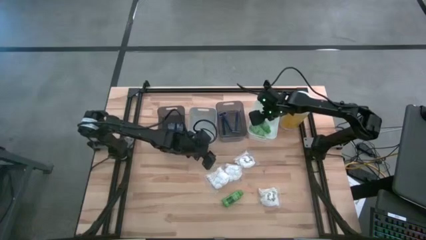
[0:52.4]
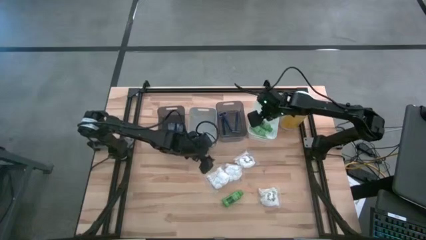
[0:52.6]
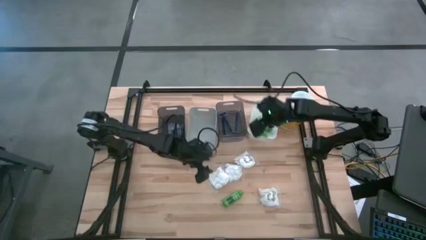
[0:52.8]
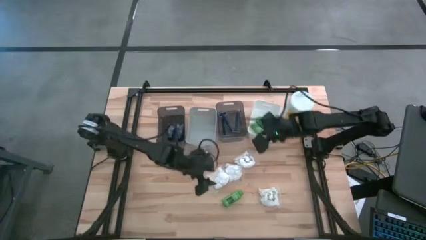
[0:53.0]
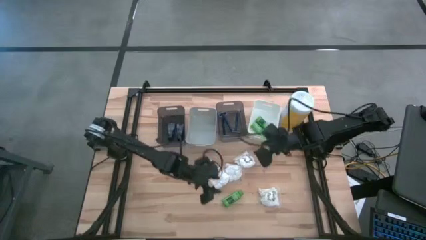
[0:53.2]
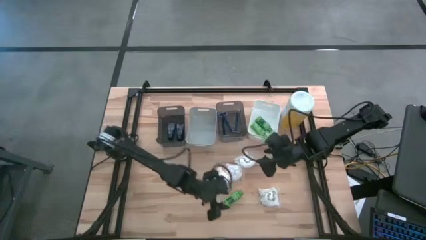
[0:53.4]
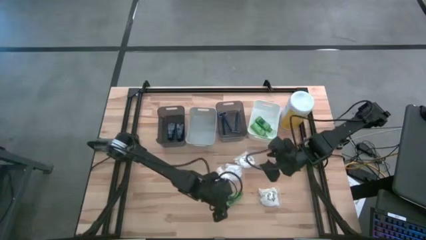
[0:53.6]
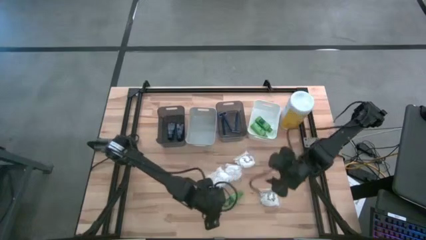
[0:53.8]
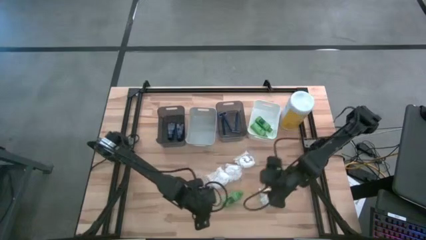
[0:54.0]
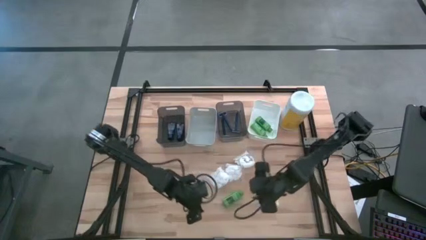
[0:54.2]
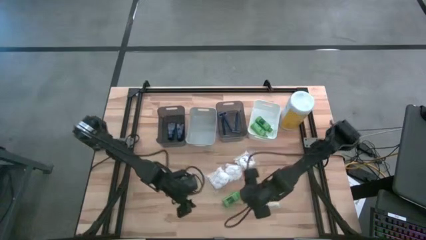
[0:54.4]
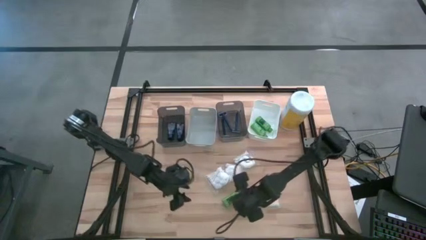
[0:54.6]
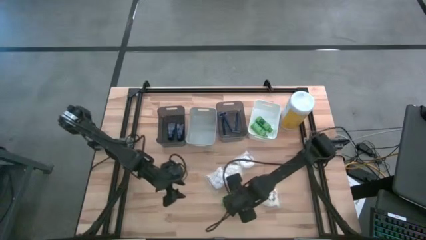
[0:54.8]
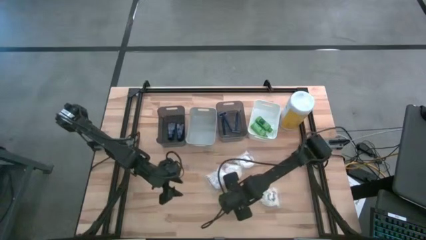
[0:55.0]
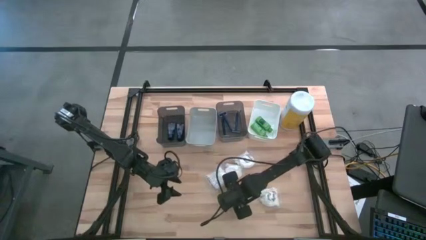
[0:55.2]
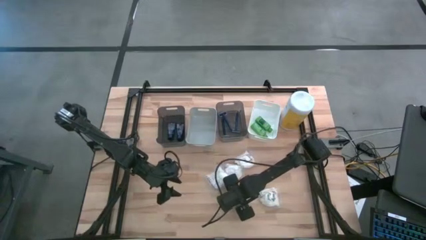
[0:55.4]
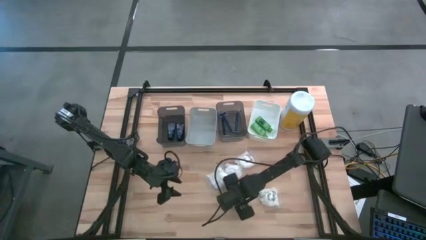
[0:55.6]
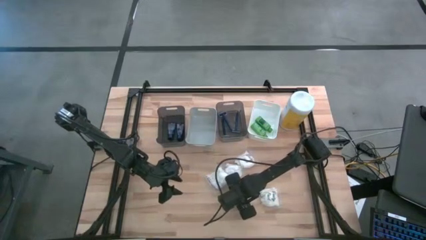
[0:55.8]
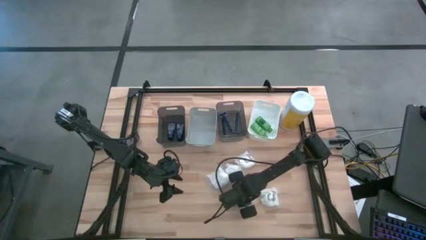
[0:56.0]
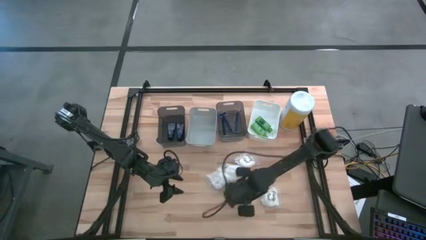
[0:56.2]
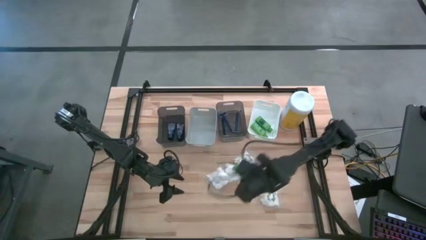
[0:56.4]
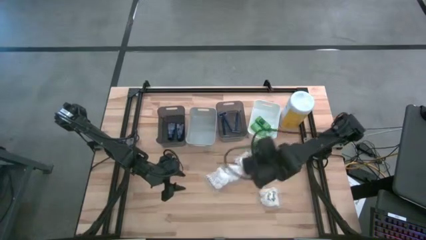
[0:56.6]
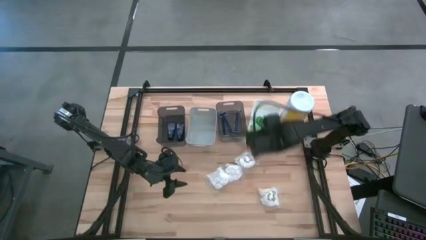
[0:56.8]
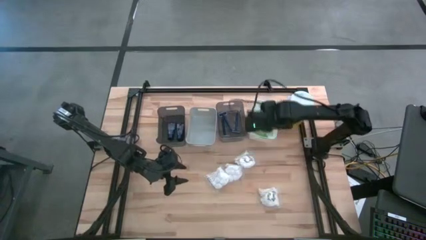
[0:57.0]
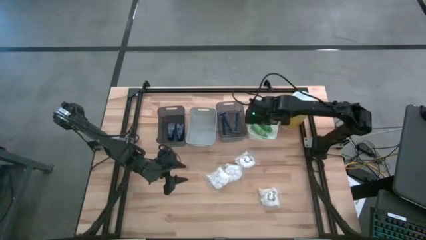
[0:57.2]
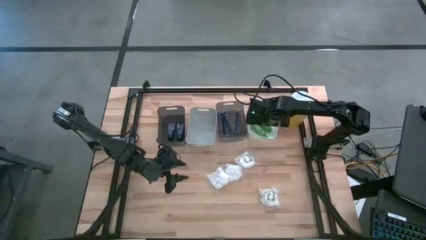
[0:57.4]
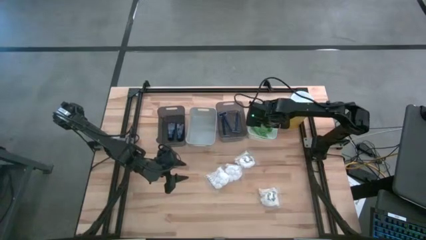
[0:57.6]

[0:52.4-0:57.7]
Task: Pick & Place Travel size toiletries
Put the green shampoo into the white bin

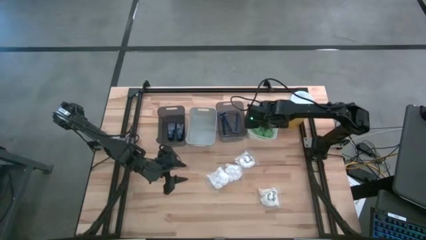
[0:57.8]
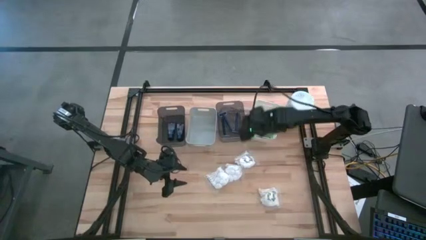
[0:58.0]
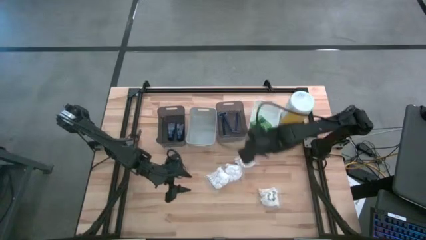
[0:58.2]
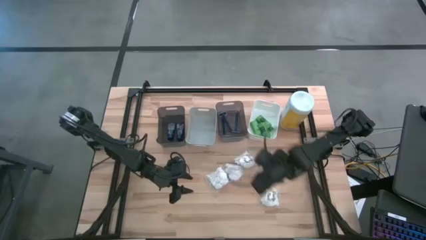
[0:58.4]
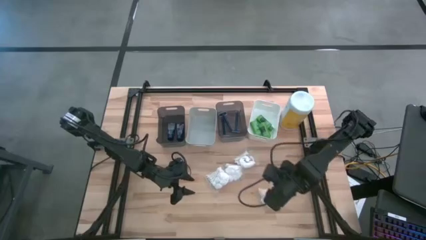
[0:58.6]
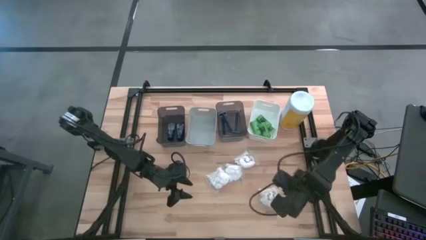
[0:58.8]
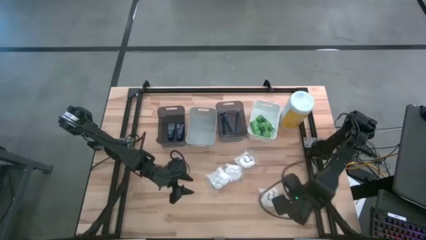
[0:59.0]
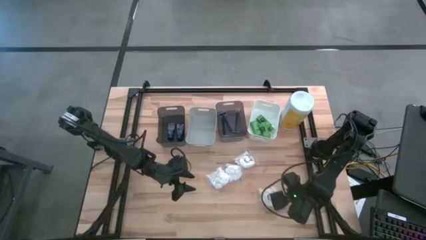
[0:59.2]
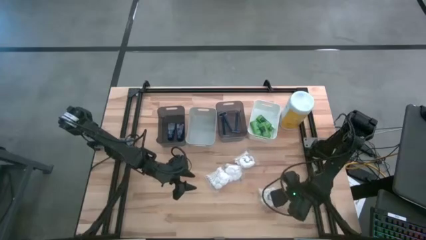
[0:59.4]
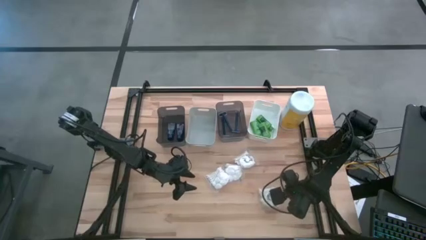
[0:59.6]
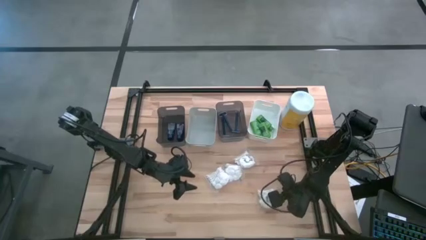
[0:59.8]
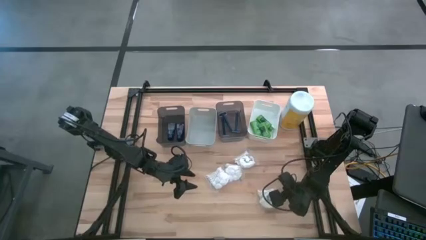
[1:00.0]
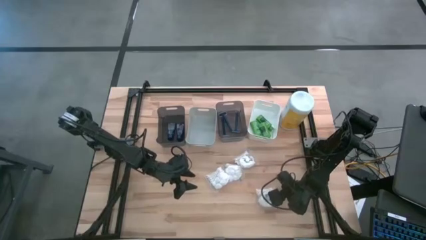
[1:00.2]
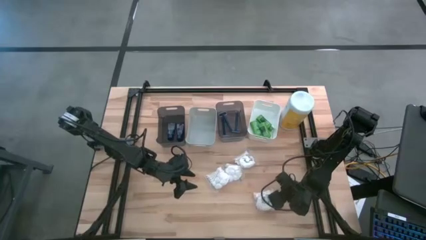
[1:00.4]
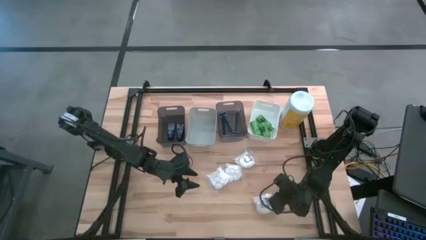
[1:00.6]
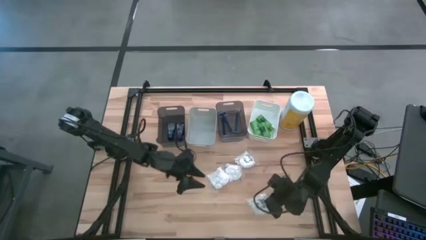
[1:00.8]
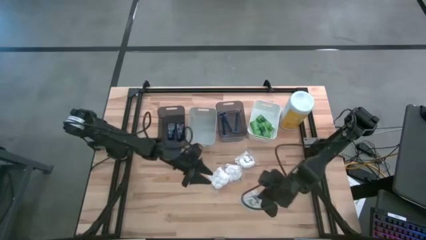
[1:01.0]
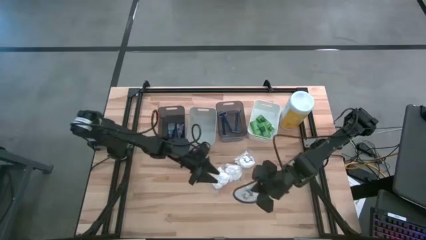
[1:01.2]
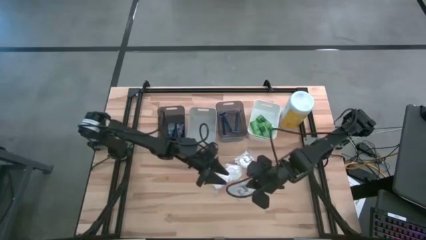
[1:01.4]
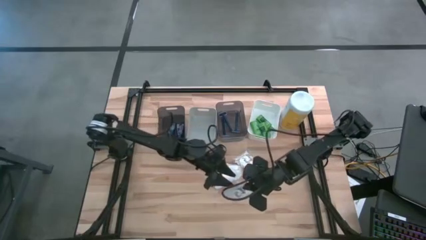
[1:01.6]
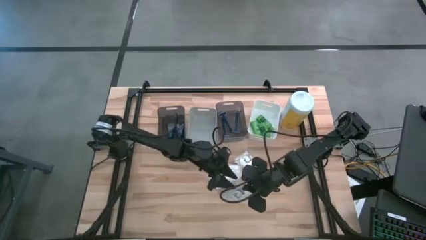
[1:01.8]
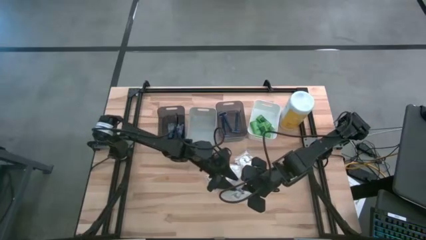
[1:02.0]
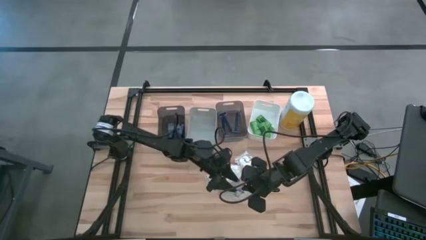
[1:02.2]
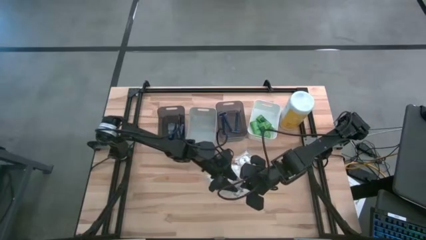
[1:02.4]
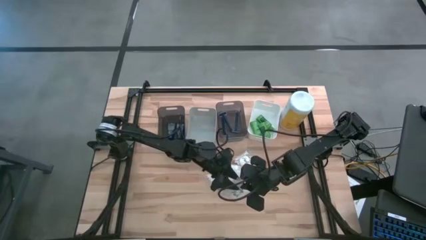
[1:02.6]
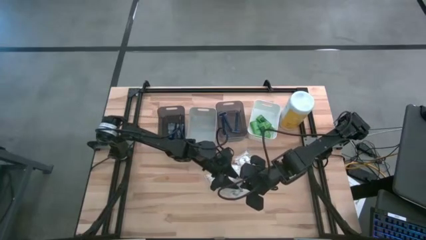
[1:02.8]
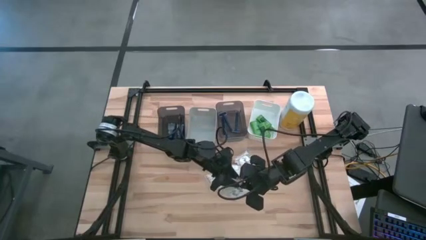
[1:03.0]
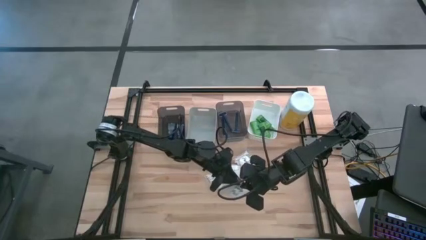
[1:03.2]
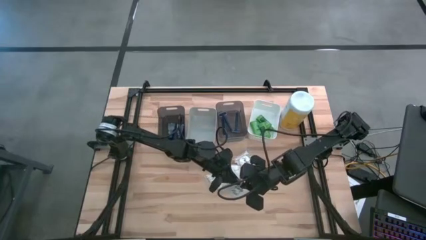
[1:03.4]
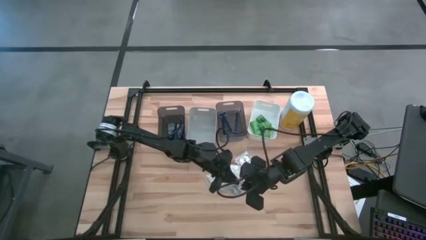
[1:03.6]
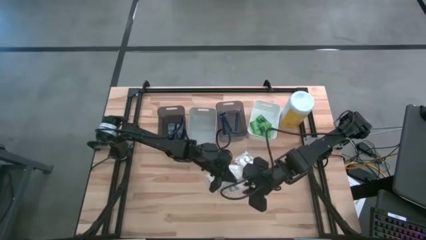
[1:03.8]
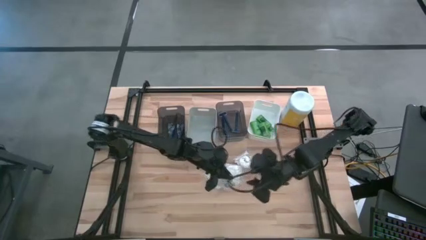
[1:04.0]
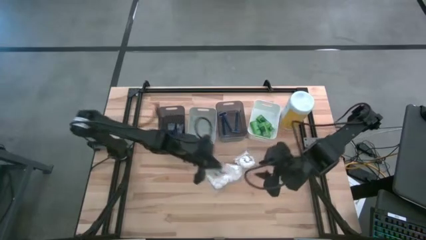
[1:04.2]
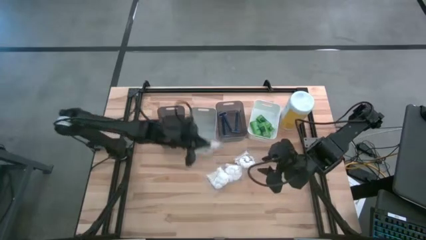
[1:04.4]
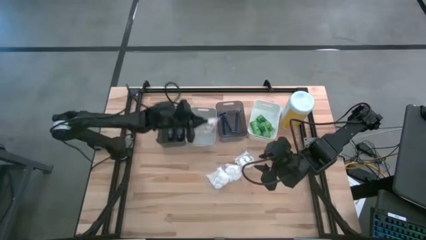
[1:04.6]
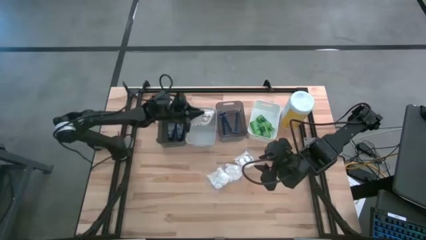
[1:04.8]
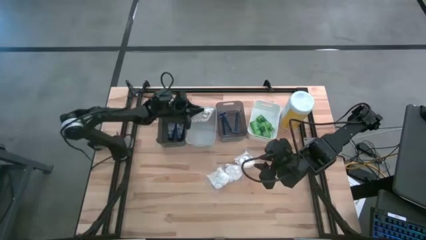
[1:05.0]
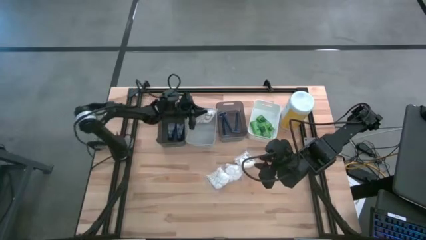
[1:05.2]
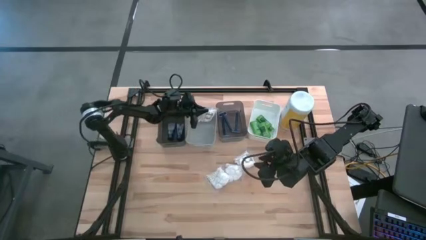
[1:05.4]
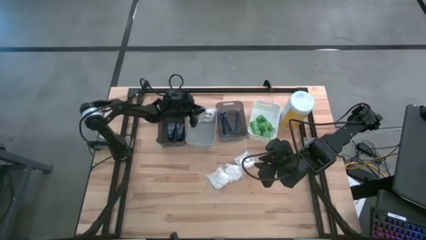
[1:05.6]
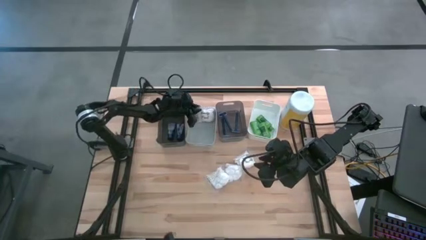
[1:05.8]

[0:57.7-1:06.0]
Put the white cotton pack into the gray bin

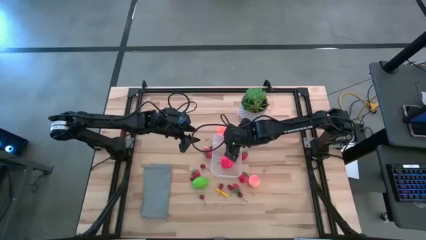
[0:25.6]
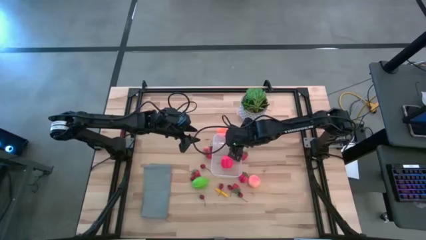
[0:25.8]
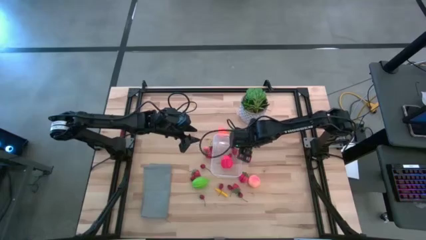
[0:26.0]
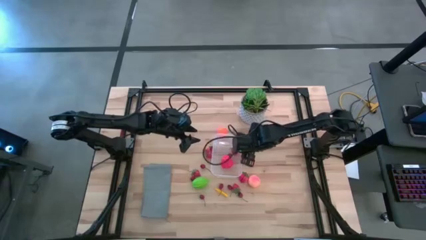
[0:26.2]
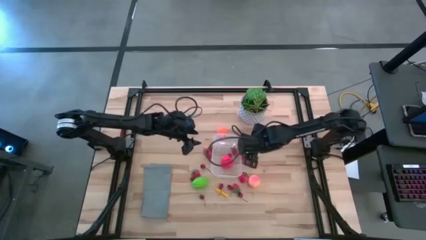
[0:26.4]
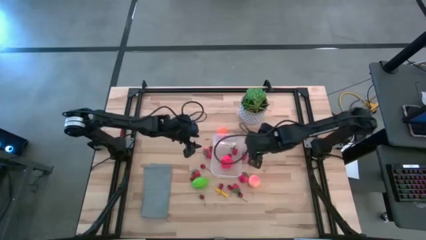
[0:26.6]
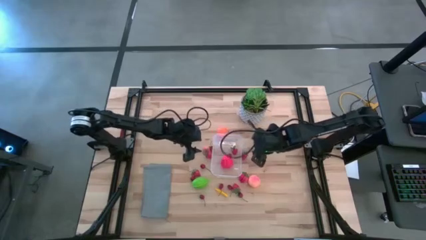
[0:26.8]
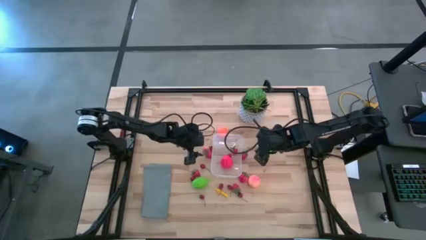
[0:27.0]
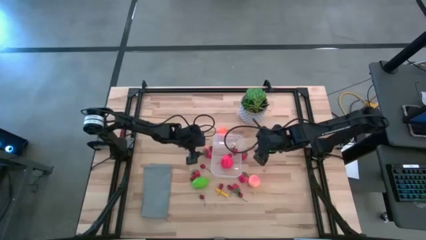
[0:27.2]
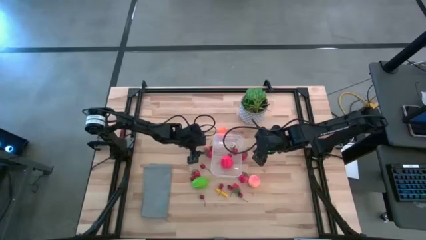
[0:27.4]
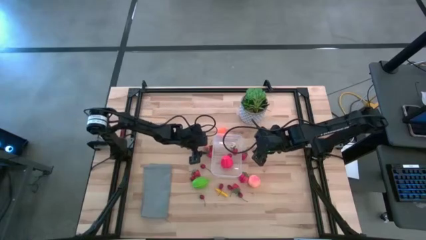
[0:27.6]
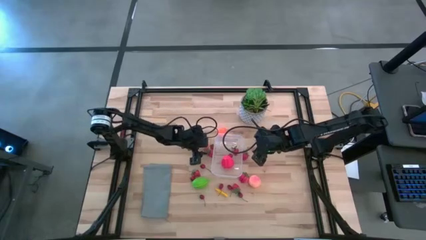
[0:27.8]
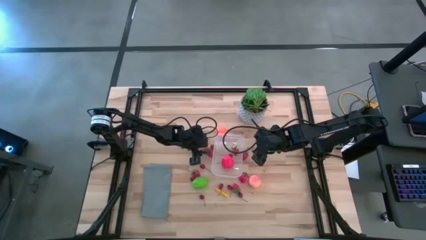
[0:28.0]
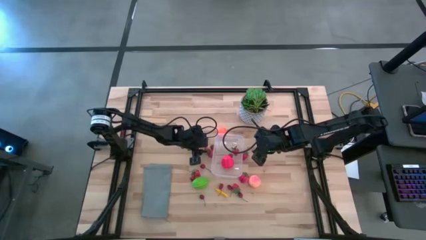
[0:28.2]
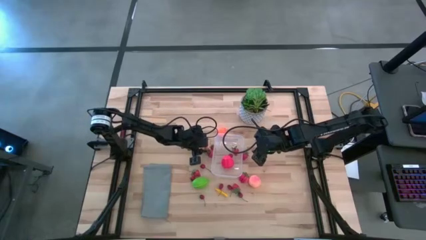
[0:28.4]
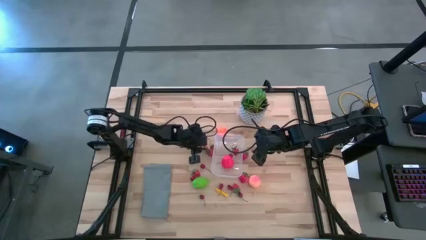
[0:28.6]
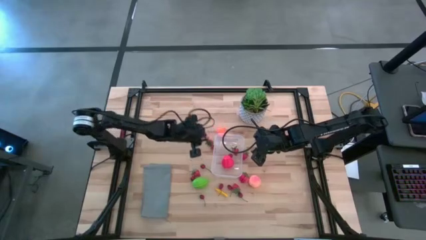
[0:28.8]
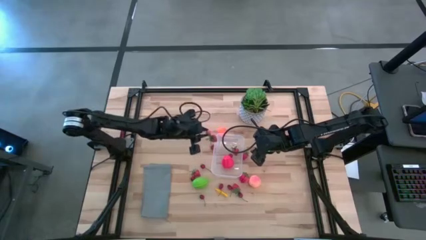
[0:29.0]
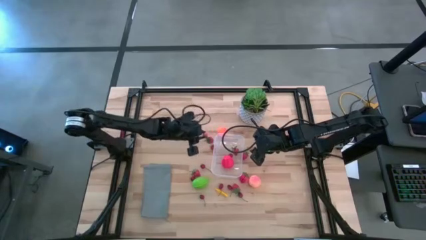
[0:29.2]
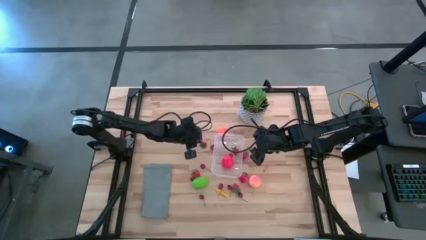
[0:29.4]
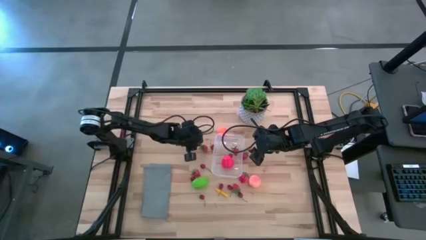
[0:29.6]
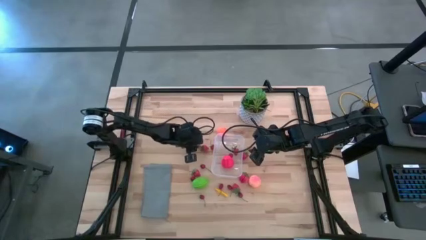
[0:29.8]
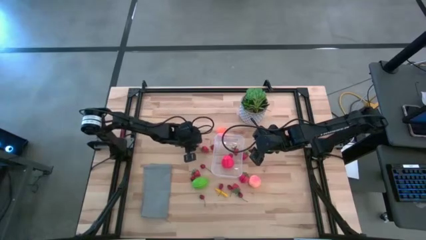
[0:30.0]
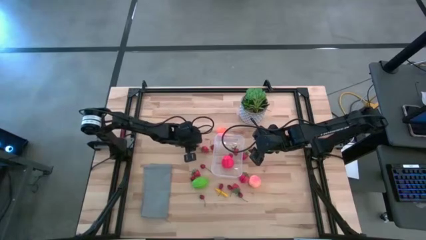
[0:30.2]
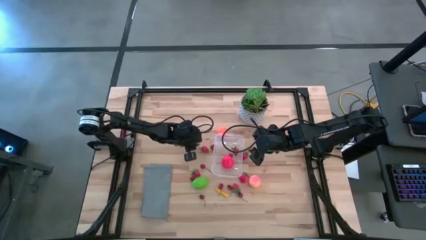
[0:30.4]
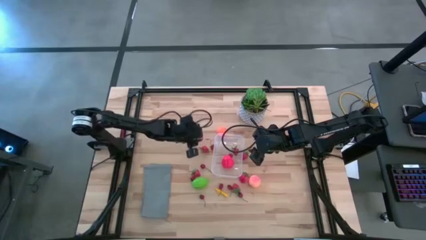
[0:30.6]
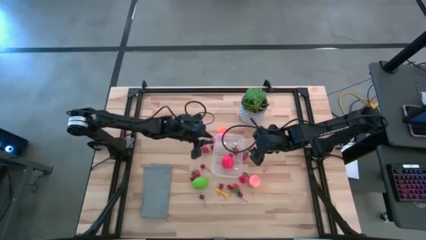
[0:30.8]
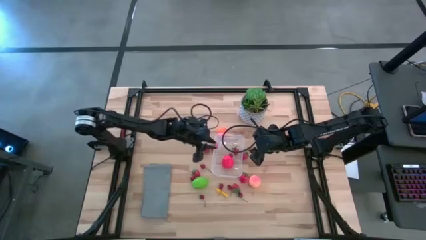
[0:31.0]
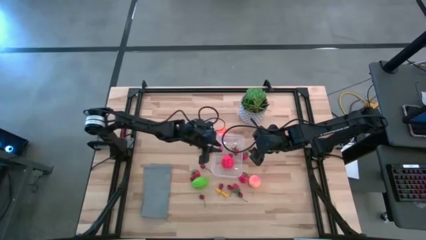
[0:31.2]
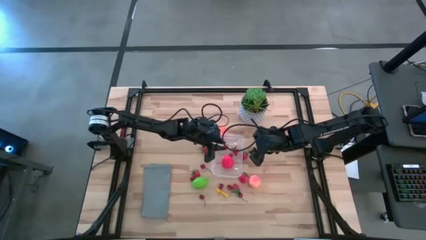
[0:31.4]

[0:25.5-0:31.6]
Task: Pick and placing Produce into tupperware
Put the pink peach into the transparent bin
